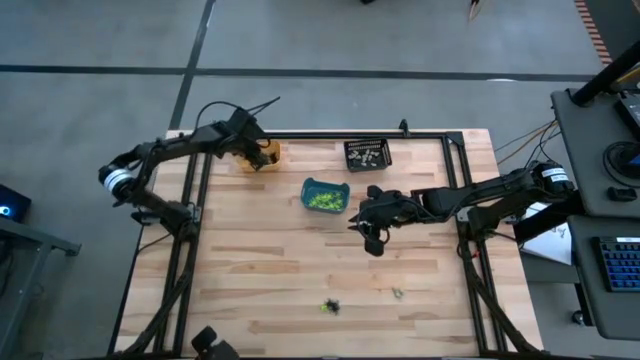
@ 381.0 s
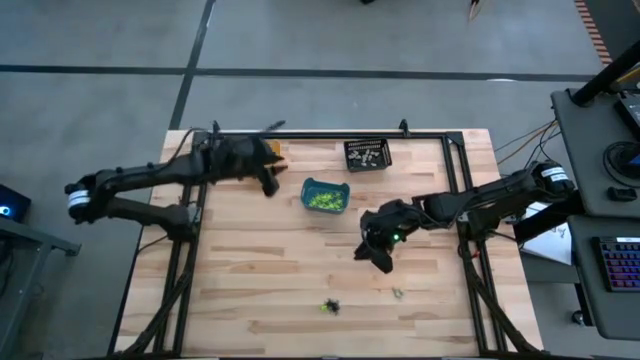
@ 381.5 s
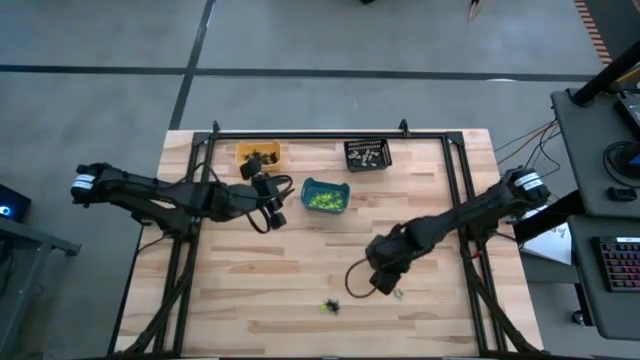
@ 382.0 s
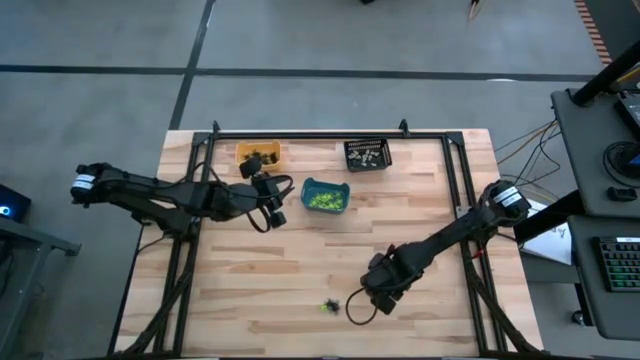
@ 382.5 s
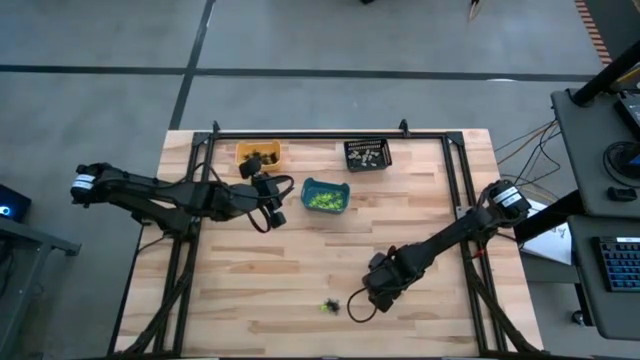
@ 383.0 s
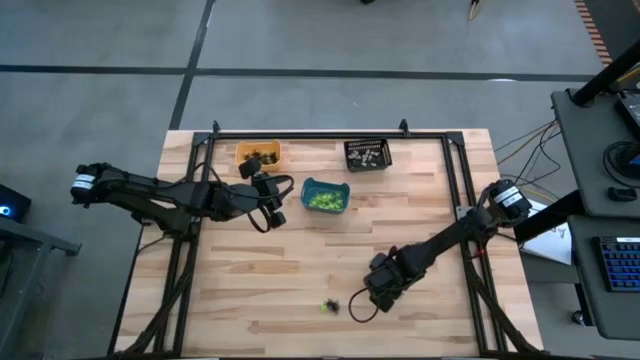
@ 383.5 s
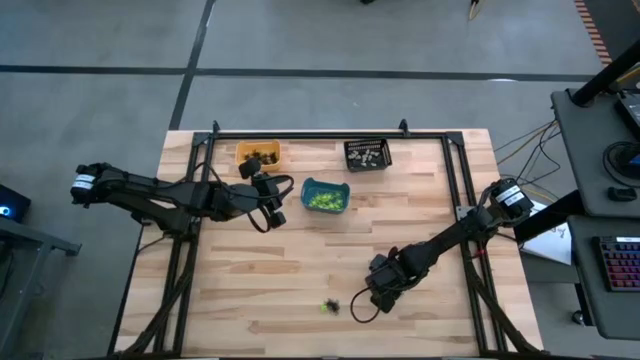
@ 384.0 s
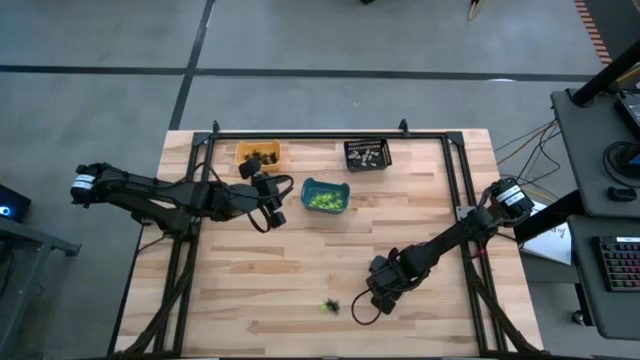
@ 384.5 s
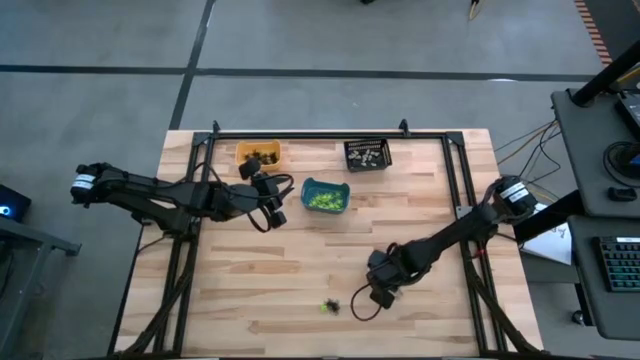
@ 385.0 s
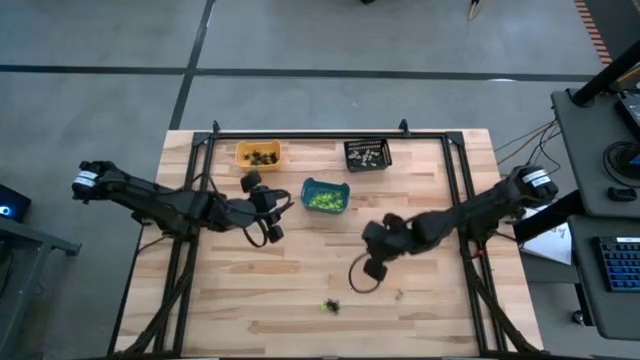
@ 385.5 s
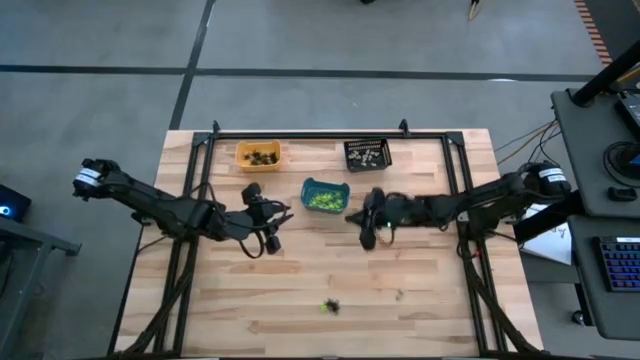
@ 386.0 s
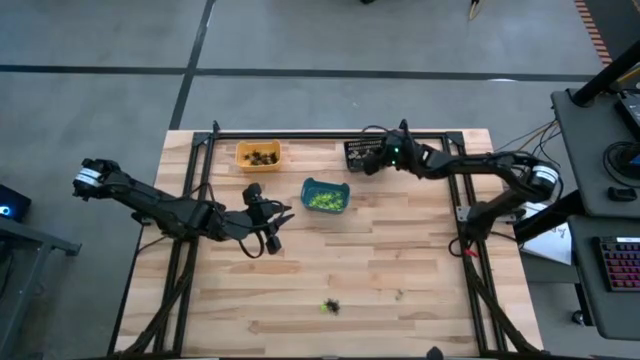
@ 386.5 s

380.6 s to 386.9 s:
Task: Sort Halloween decoration
Put the white skull toy into the black bin

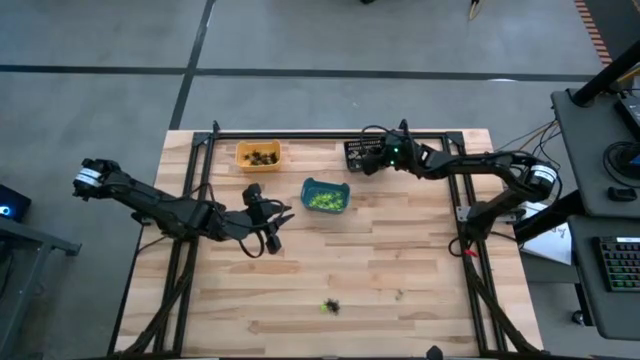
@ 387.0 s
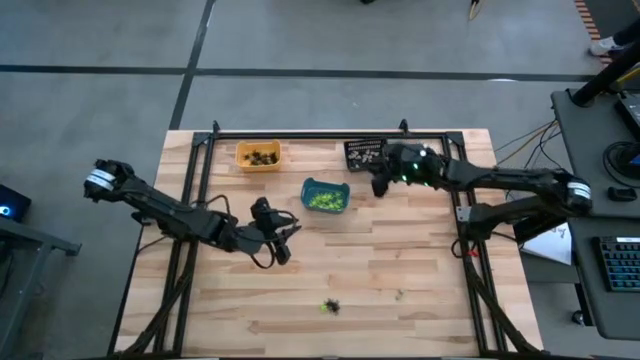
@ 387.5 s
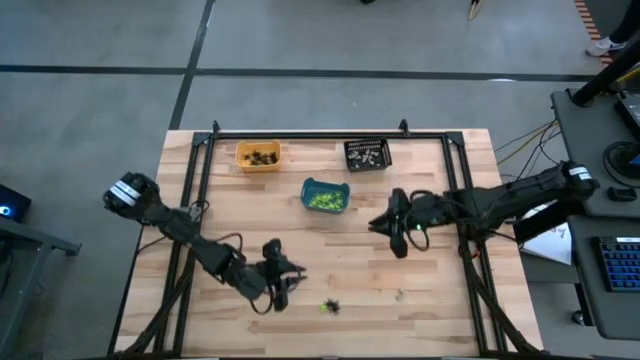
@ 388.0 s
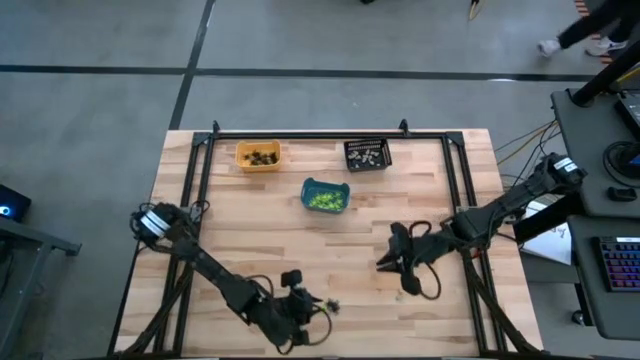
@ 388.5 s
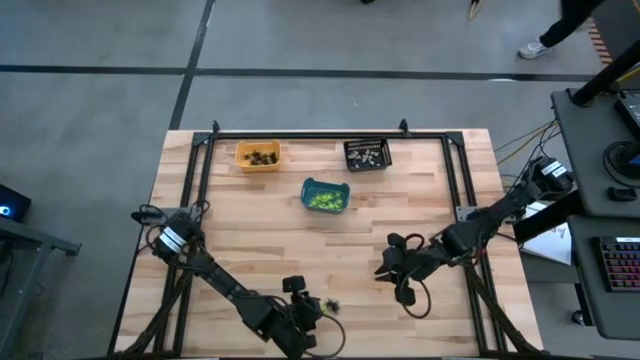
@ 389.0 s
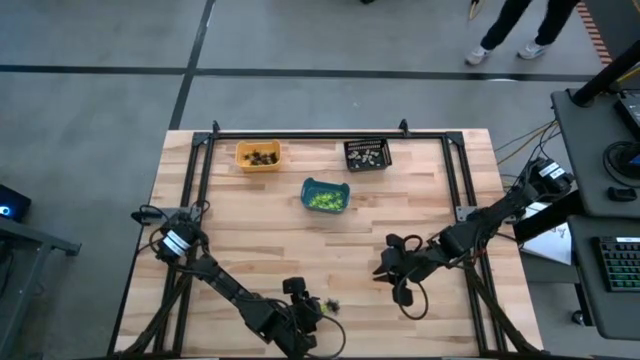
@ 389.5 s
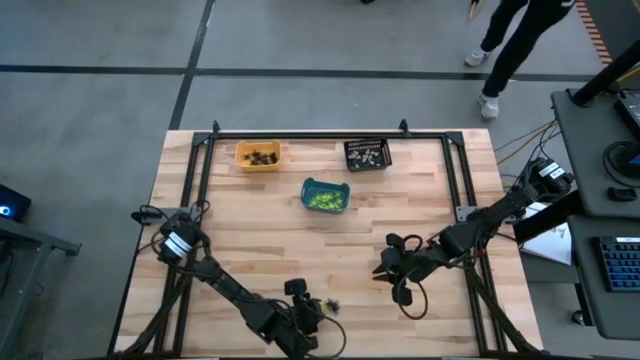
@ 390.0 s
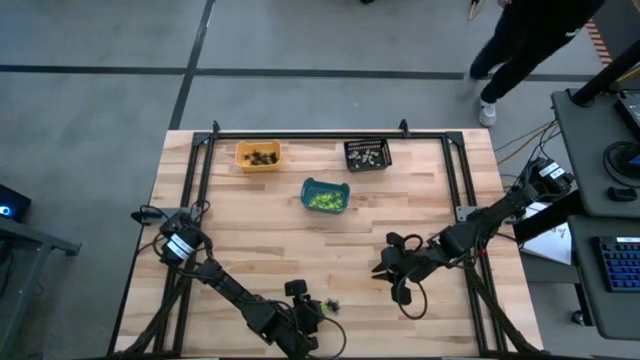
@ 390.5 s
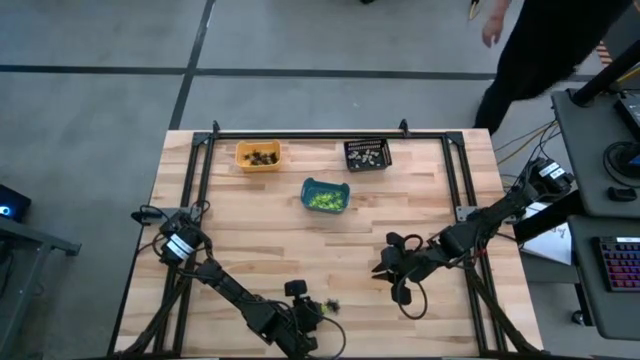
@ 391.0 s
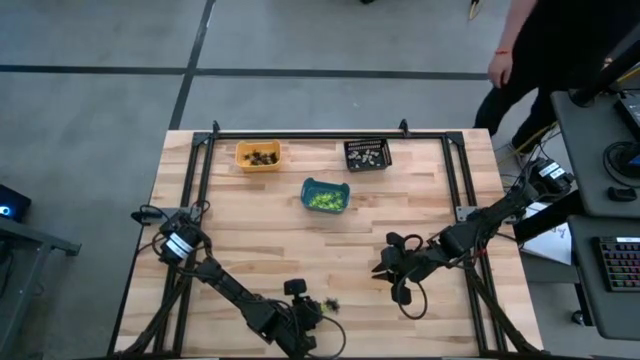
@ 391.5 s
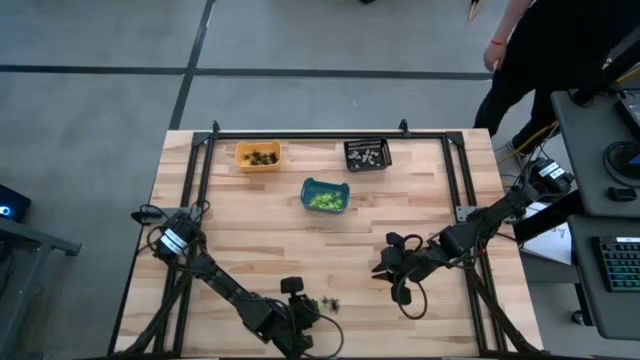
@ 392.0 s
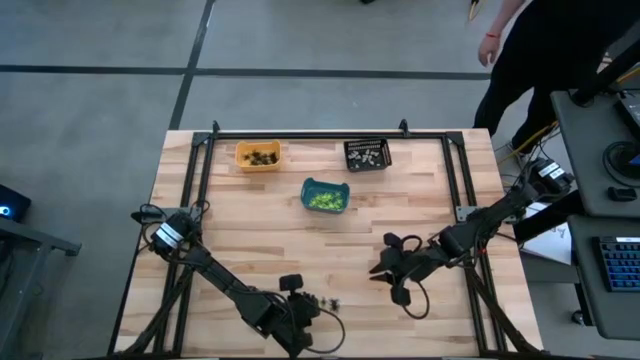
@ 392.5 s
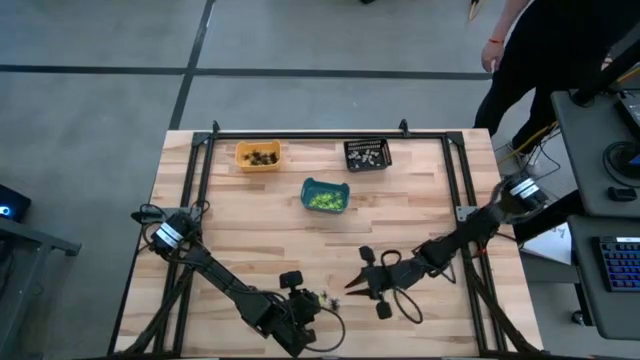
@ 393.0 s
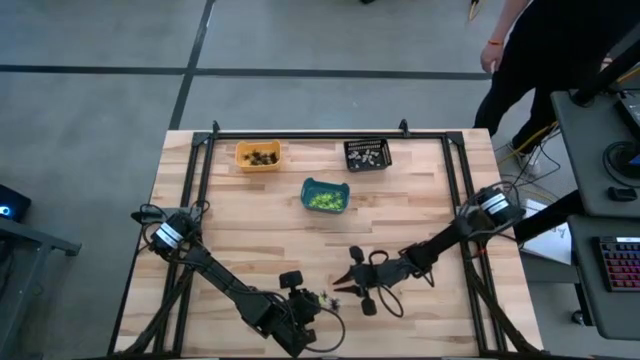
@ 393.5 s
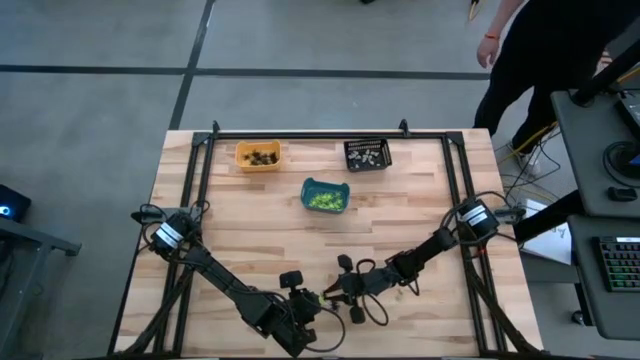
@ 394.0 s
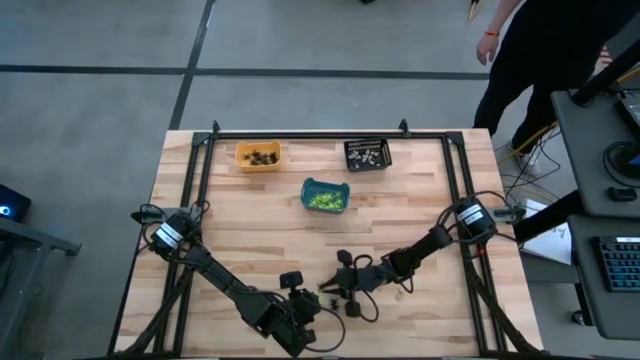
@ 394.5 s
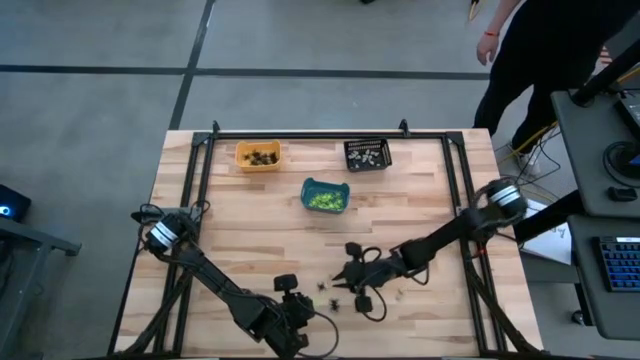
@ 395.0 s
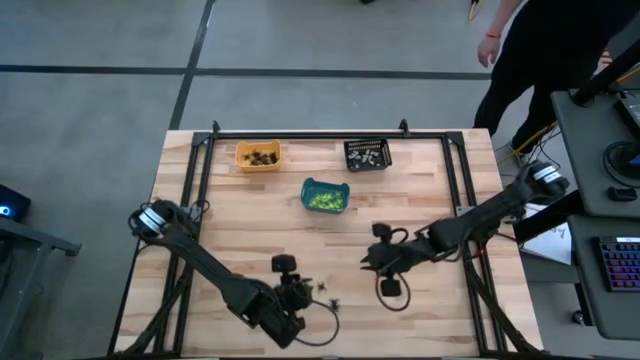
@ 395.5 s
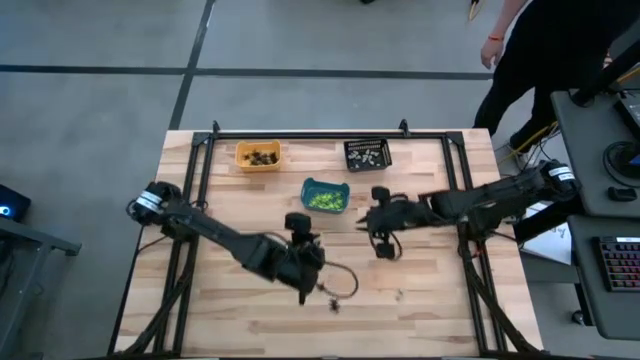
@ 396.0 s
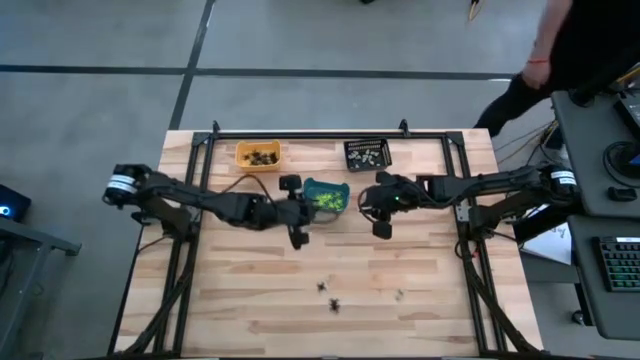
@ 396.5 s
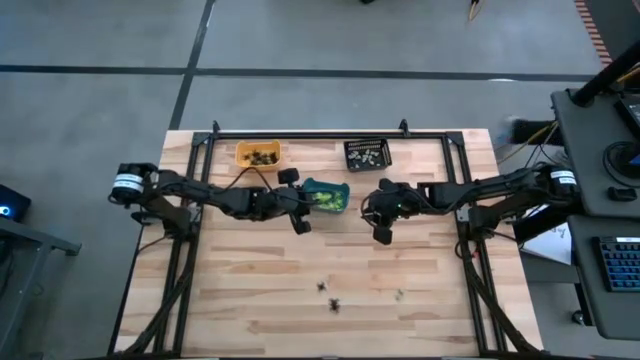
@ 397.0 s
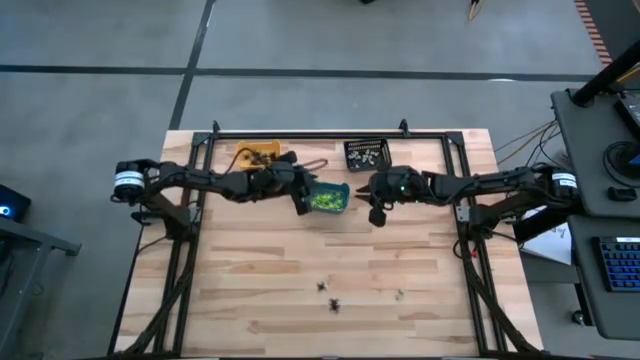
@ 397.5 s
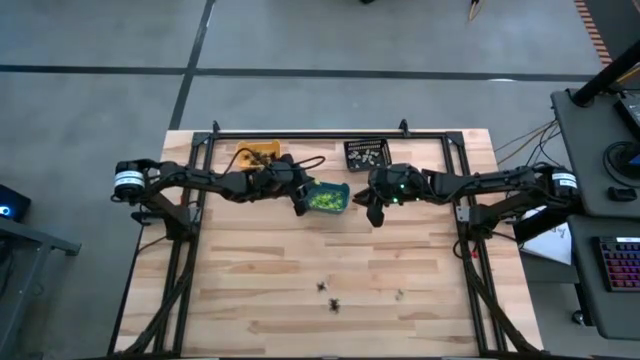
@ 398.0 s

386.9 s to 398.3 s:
Put the green spider toy into the blue bin

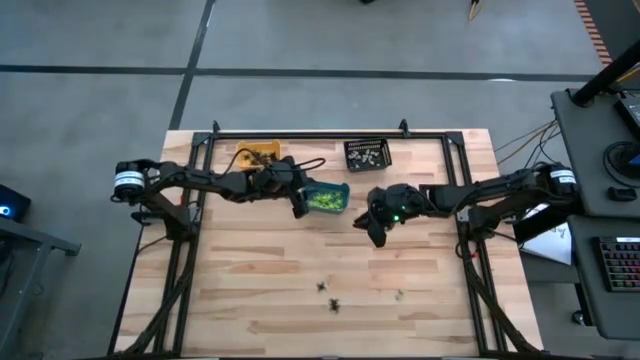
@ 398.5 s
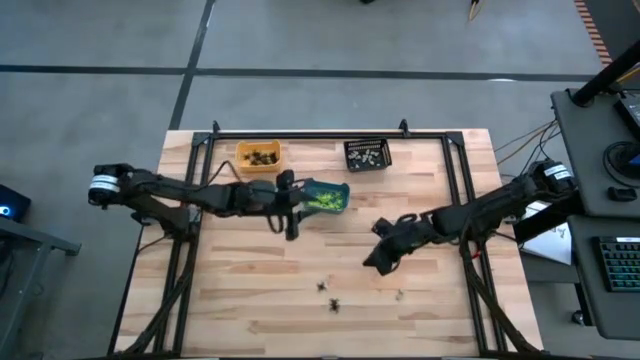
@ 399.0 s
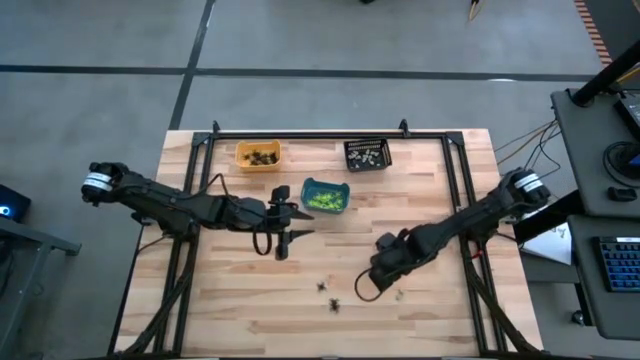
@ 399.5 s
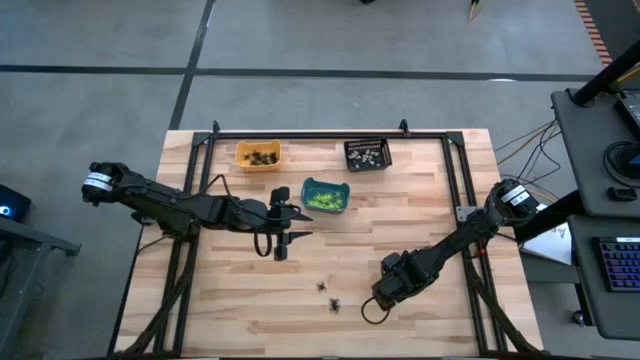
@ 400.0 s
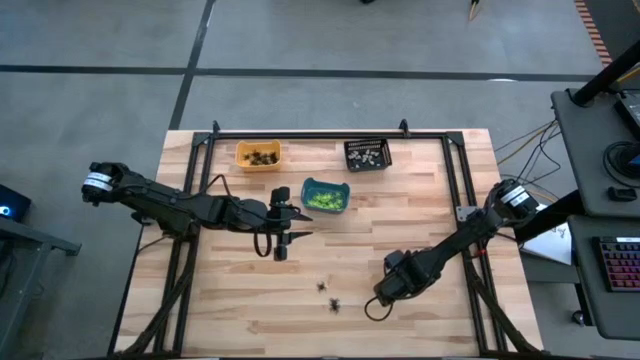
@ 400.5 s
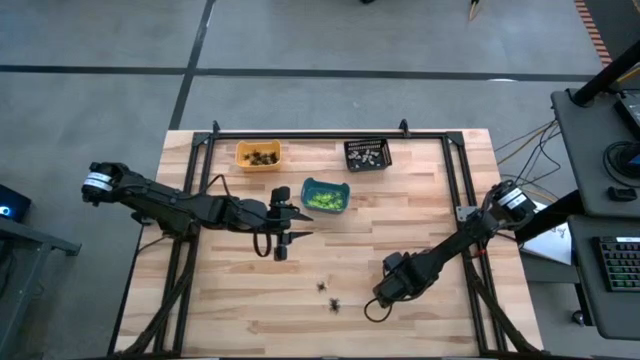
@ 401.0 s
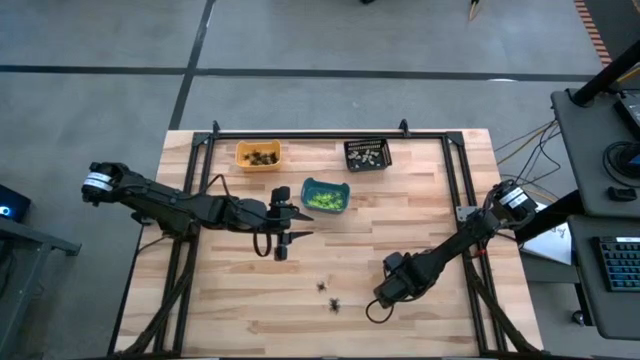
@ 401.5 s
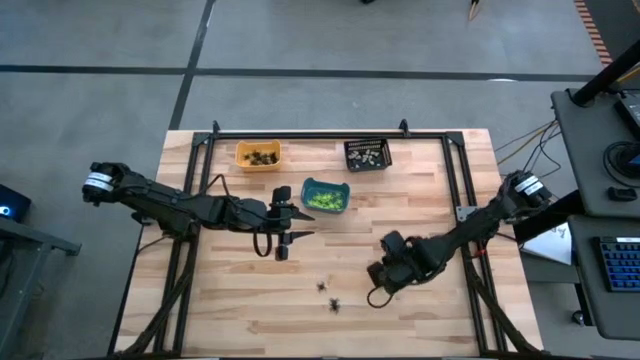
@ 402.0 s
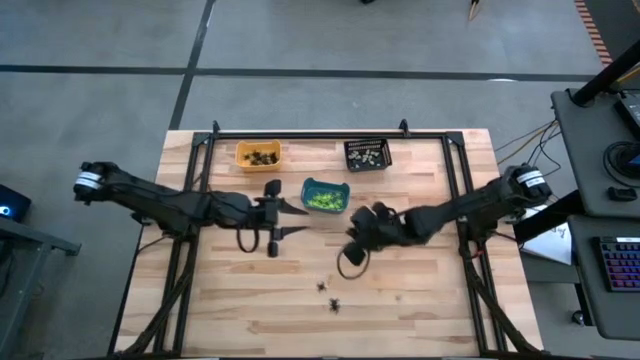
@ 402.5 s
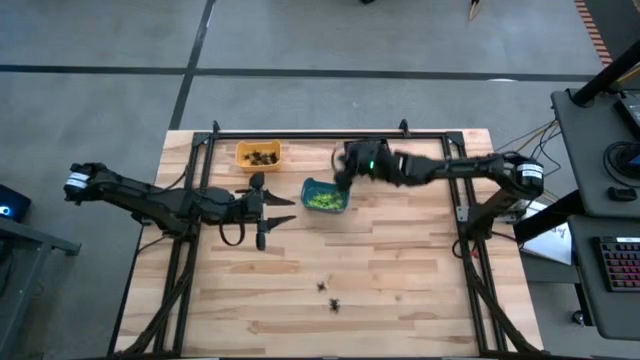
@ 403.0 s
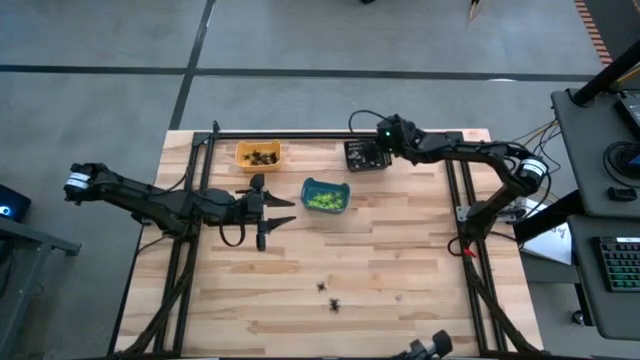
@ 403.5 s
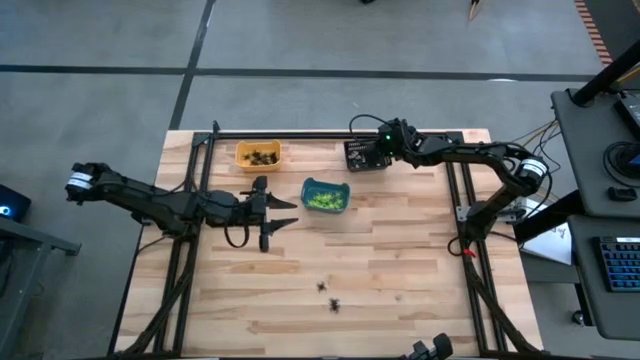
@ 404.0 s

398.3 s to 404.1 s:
Put the white skull toy into the black bin
